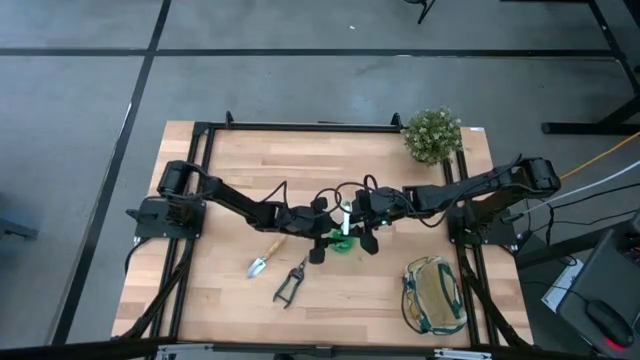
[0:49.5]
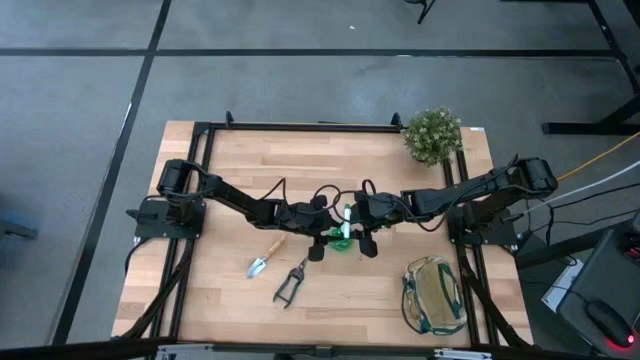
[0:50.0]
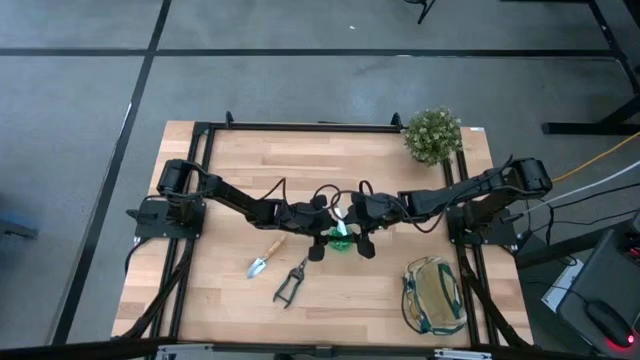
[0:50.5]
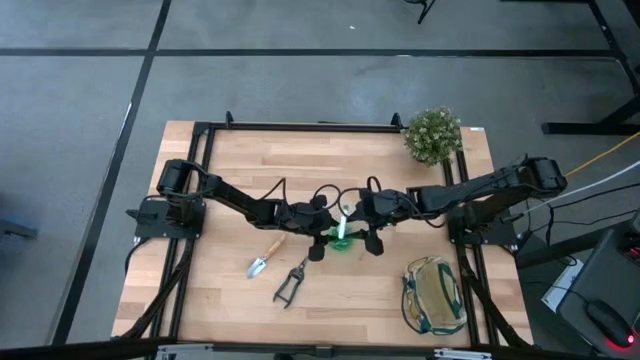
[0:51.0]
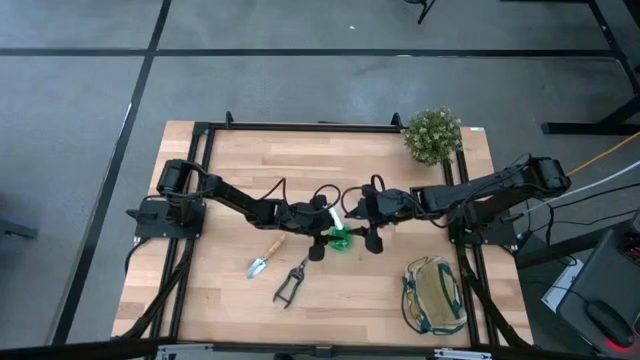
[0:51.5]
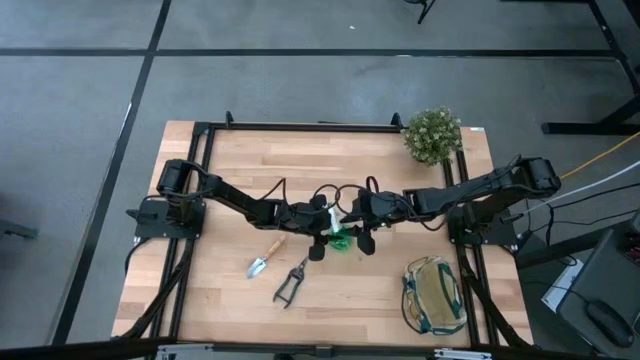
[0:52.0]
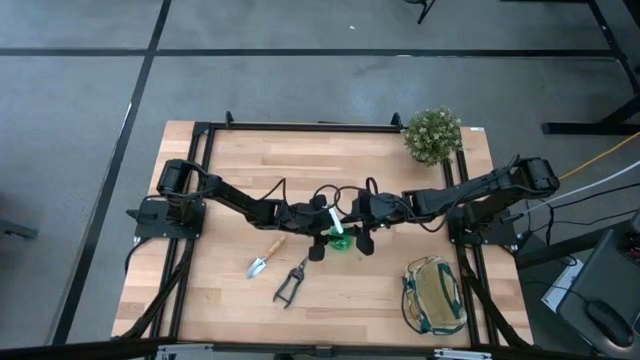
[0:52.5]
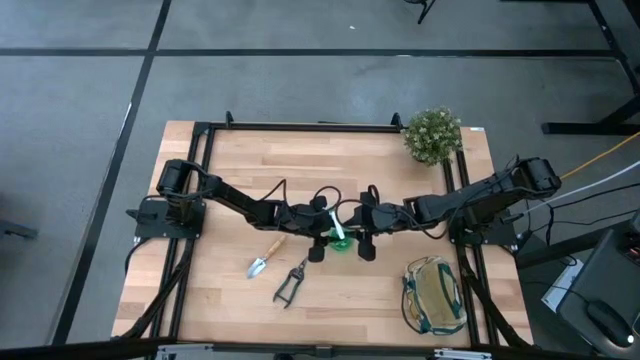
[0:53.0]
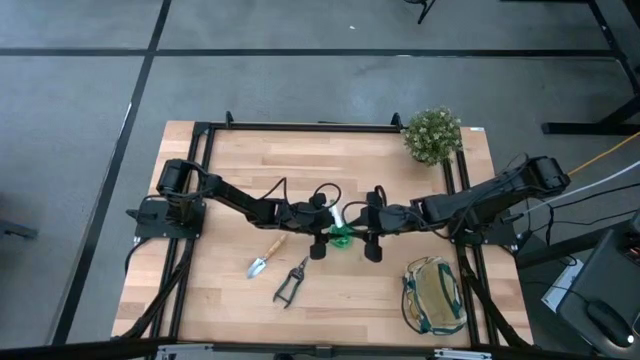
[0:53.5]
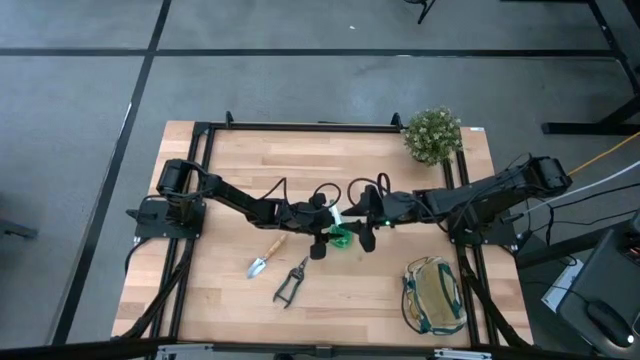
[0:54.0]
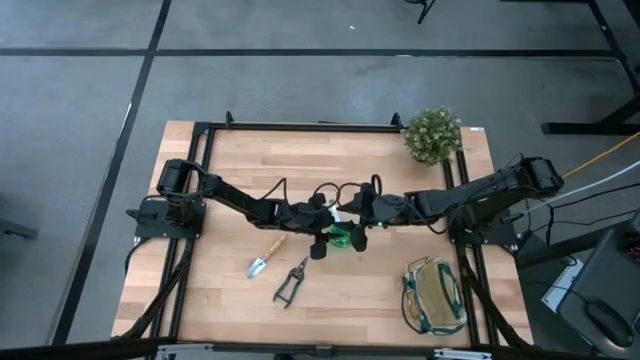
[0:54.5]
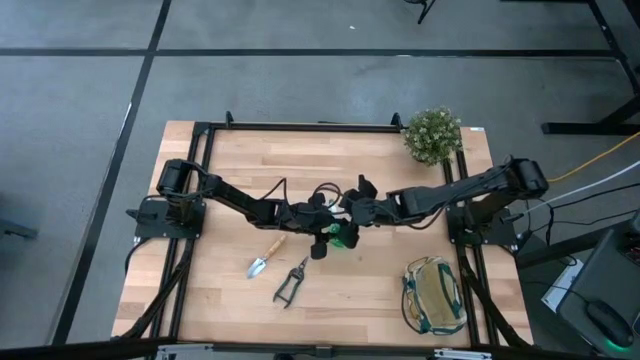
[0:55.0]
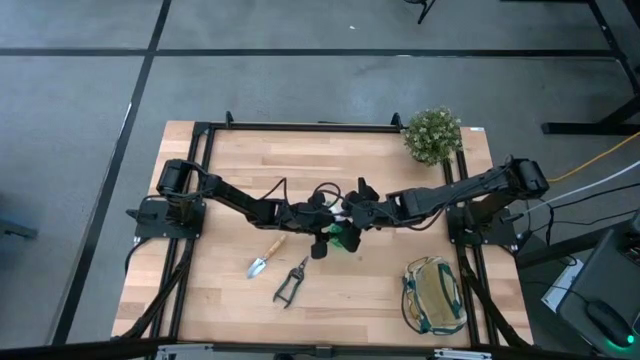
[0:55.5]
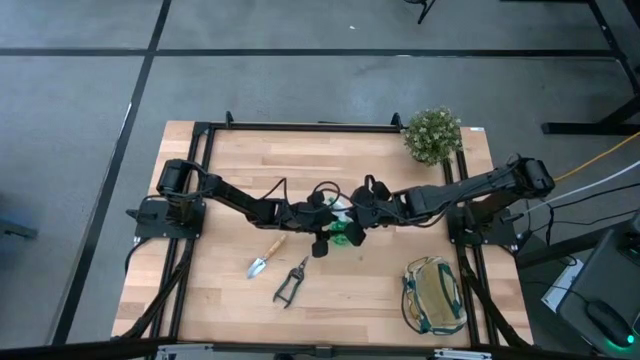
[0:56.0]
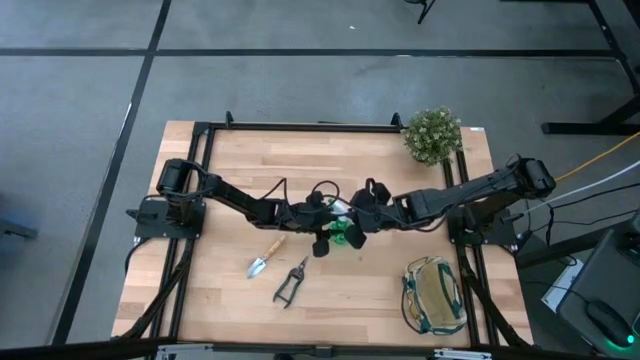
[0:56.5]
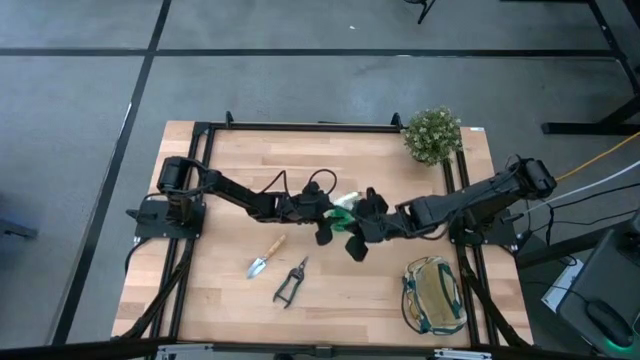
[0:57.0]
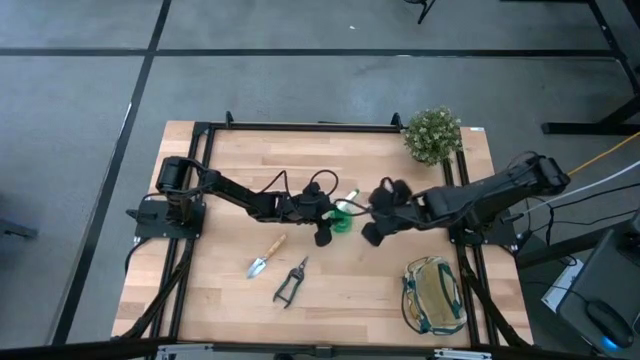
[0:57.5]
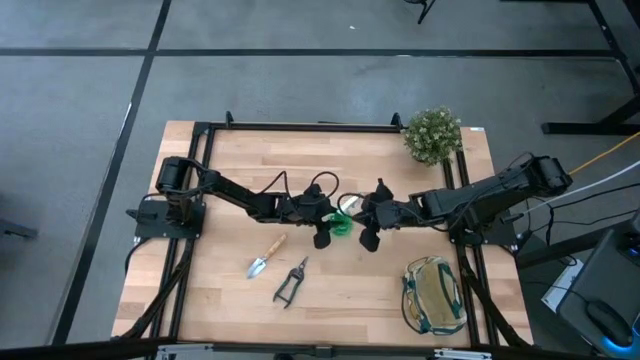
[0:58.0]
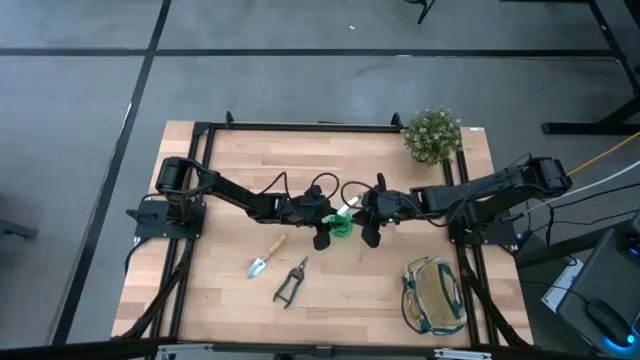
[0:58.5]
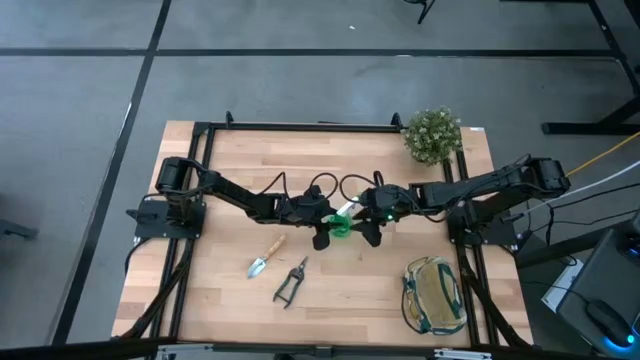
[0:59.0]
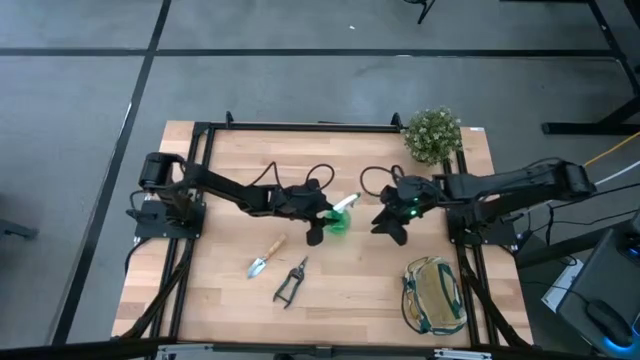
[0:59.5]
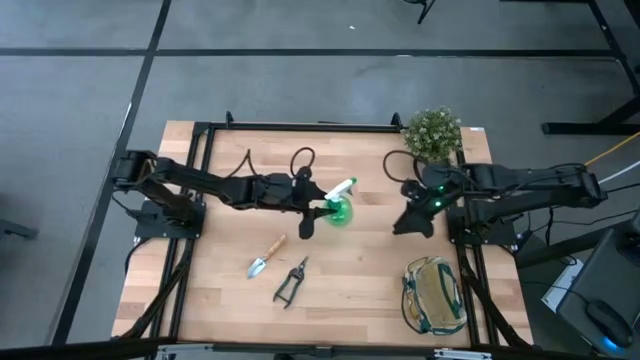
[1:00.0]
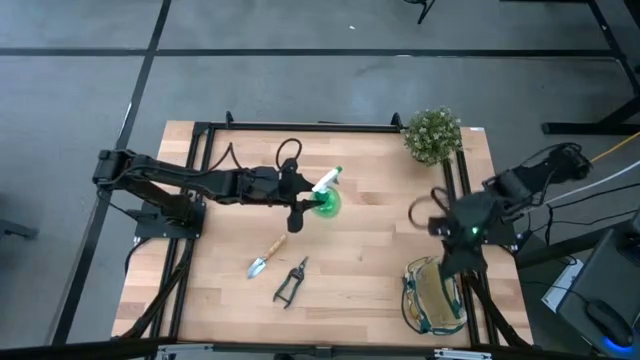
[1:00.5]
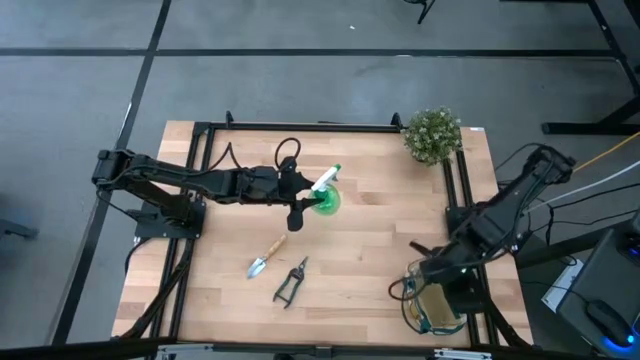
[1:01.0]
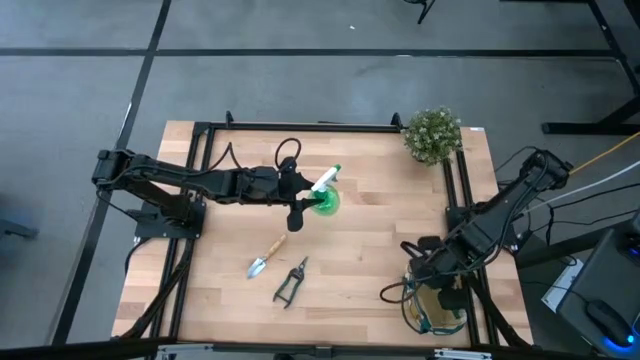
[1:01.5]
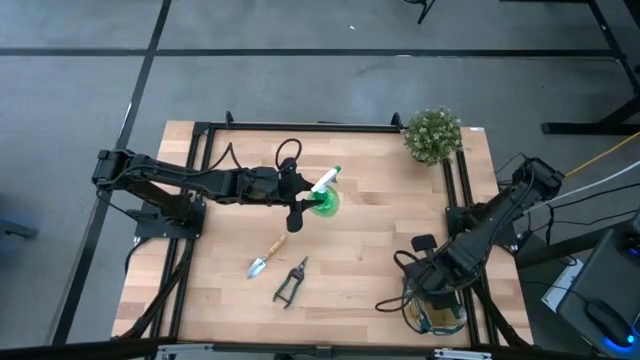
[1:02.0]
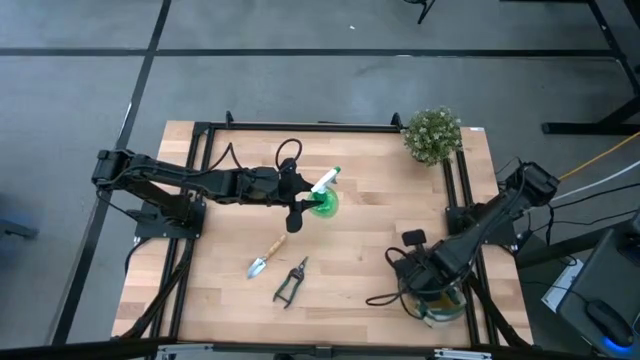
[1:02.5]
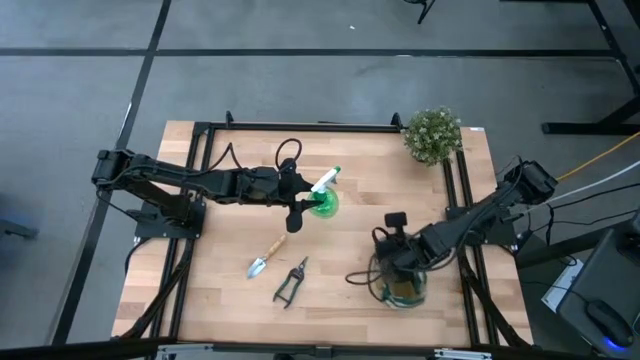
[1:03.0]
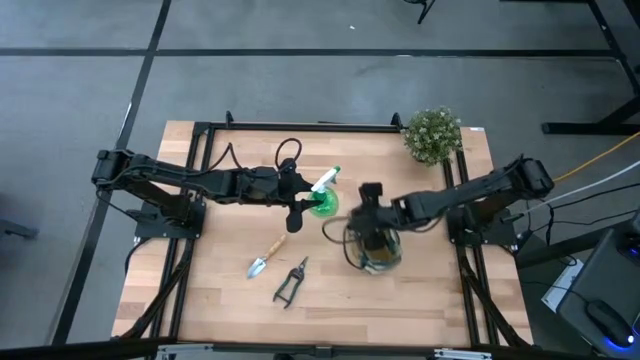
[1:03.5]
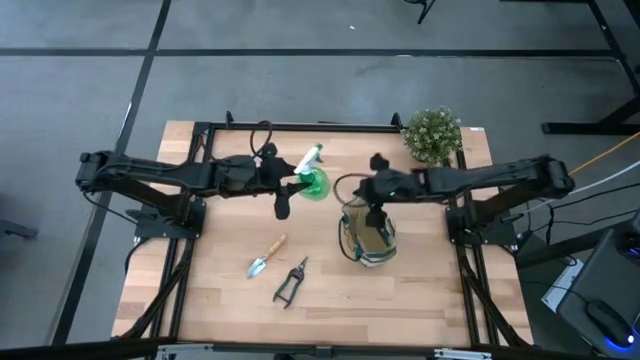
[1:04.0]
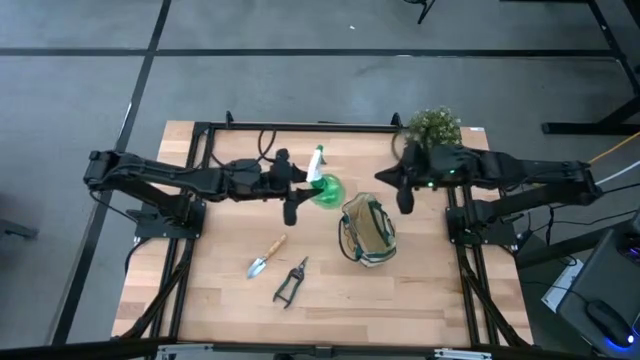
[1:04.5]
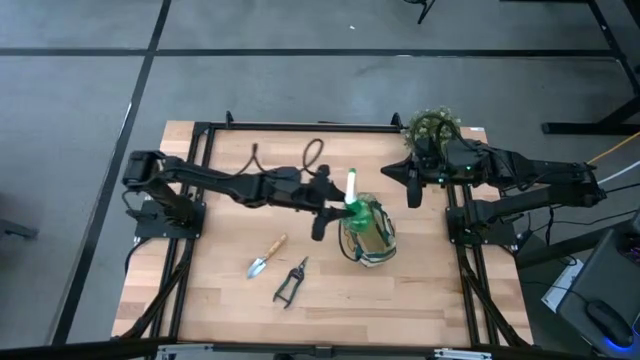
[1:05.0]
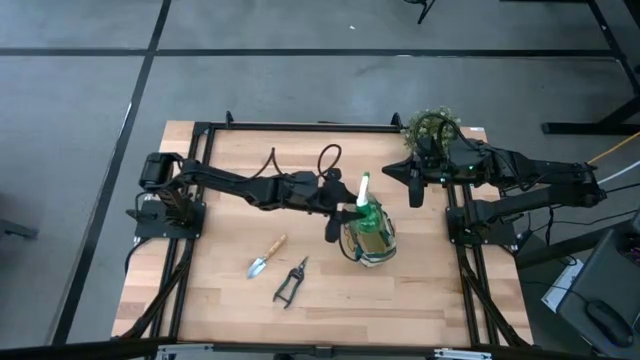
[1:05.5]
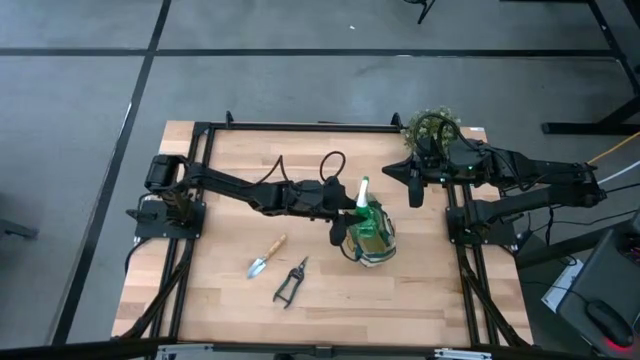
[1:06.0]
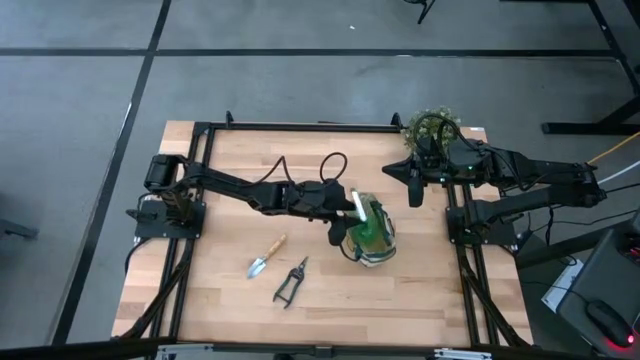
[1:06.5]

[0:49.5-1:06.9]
Task: Pick & Place Garden tools in Gardening bag
Put the green spray bottle into the gardening bag

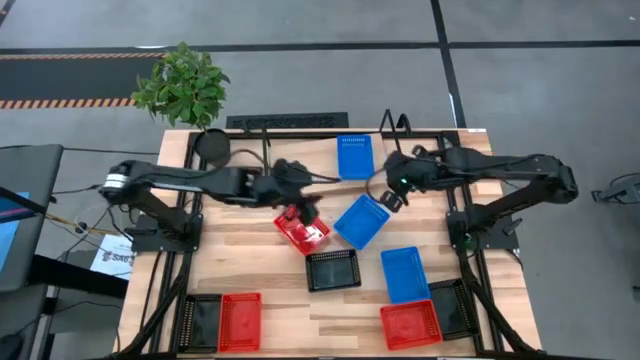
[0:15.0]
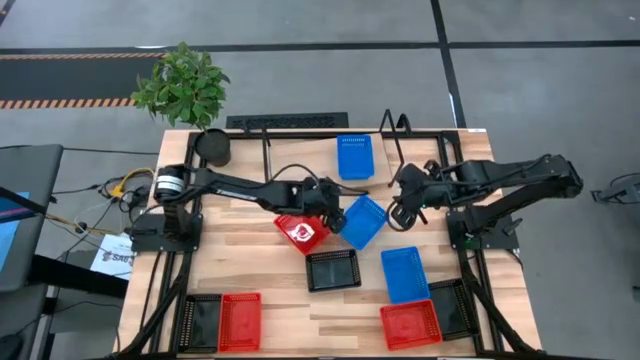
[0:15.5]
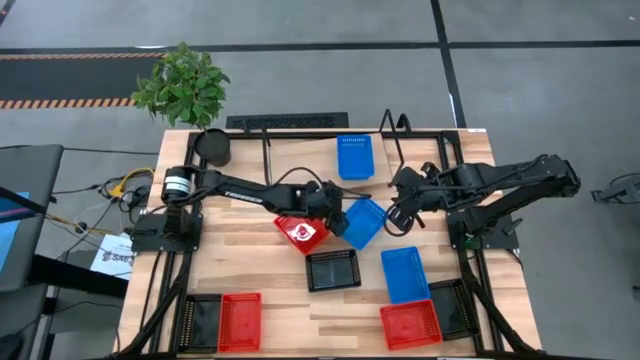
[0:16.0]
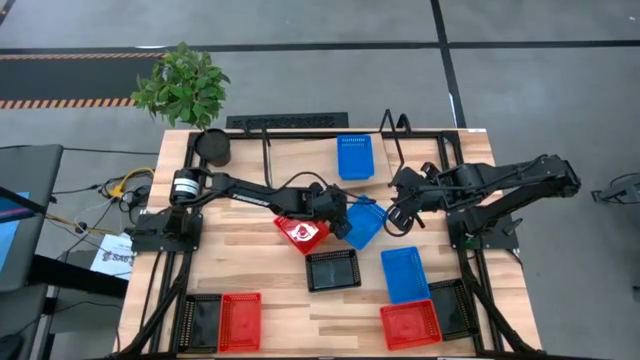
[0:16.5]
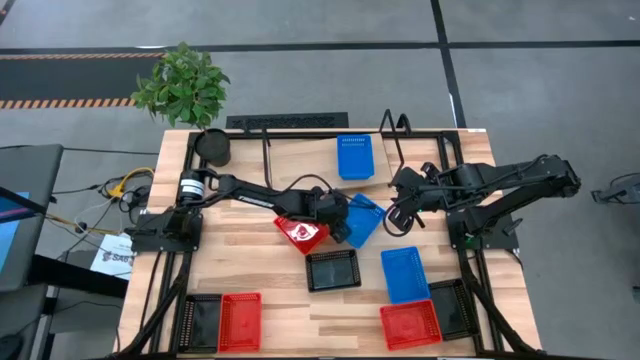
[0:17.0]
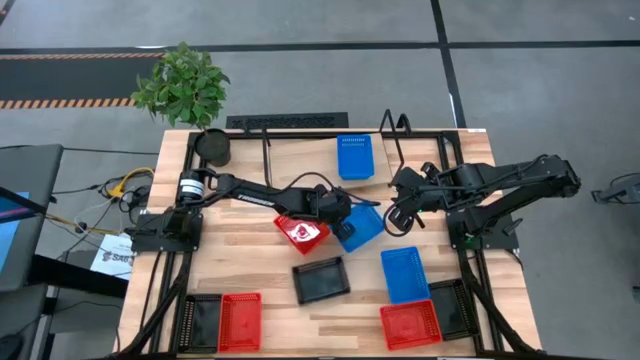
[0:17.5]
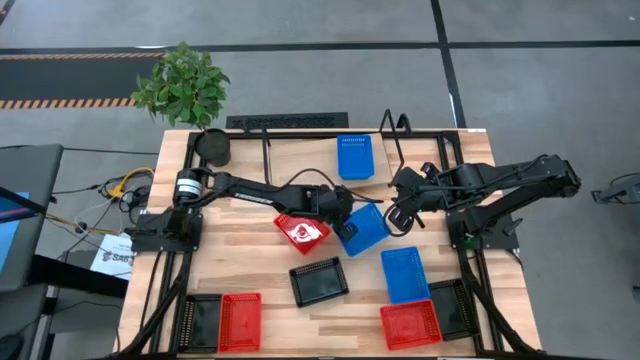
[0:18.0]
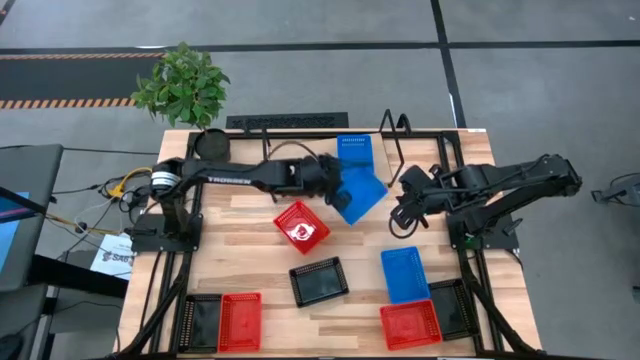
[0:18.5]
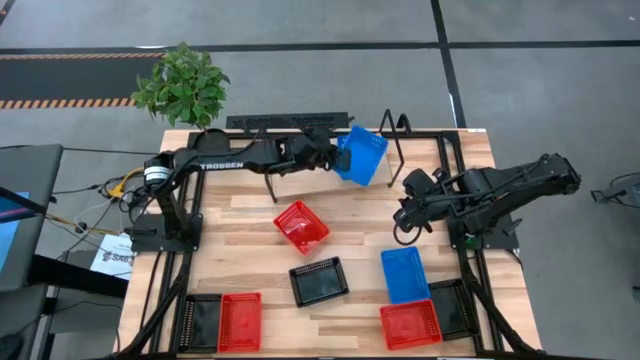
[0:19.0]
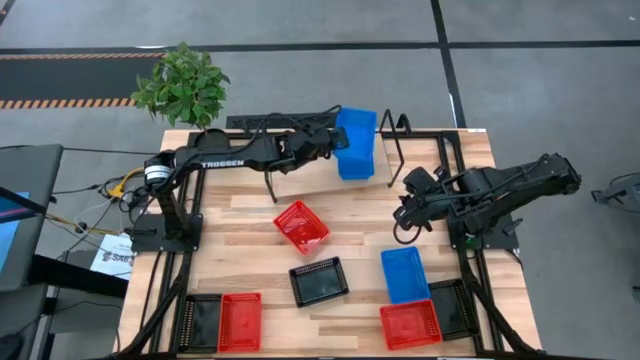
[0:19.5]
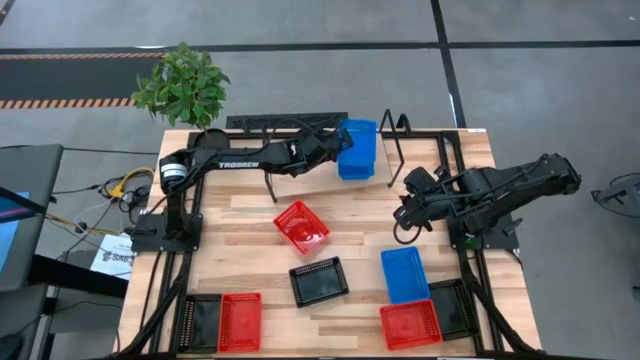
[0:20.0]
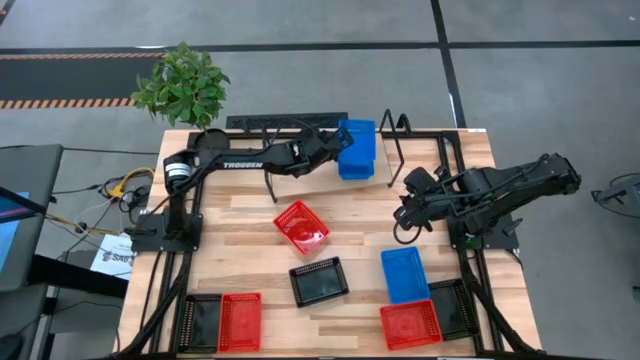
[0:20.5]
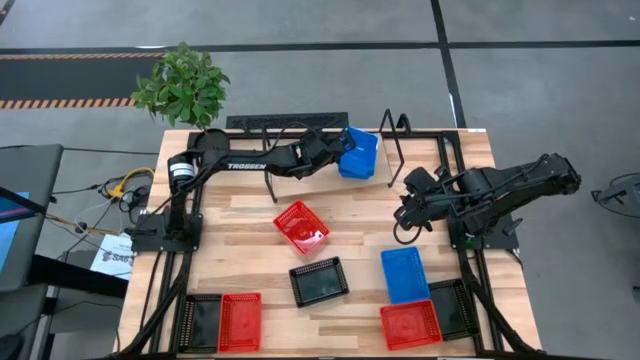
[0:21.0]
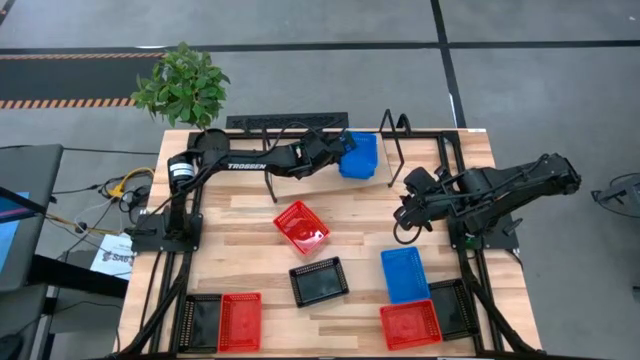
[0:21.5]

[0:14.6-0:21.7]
Task: Stack baskets on shelf by color
Stack the top blue bin on top of the blue bin on the shelf
